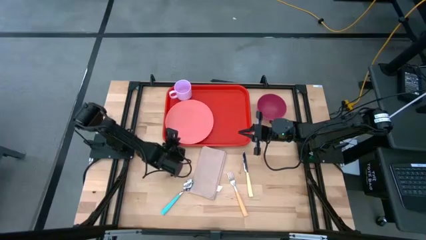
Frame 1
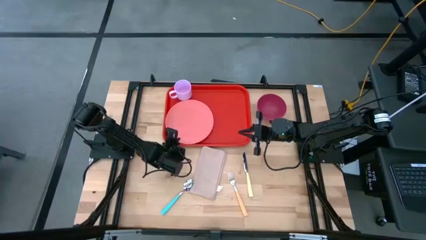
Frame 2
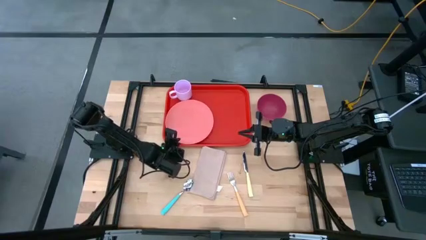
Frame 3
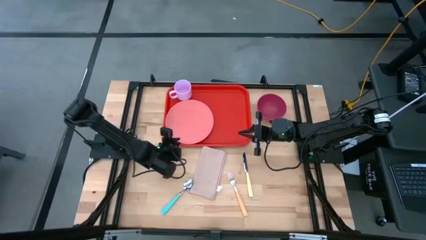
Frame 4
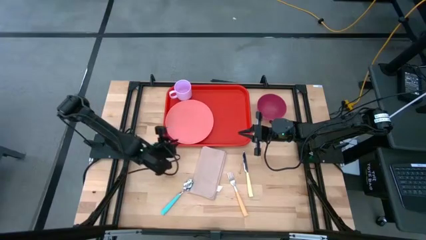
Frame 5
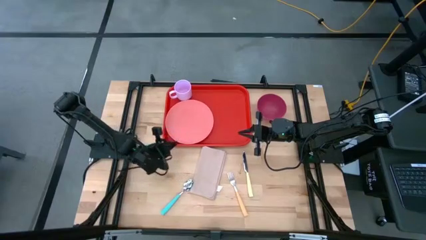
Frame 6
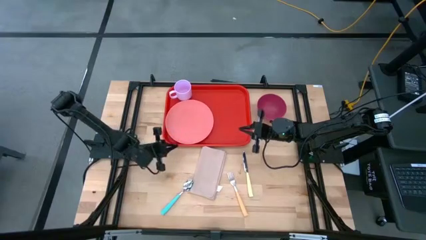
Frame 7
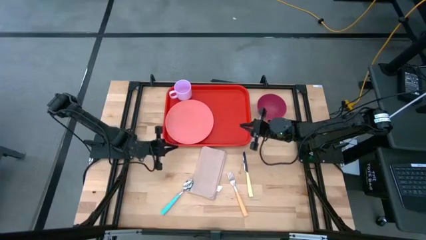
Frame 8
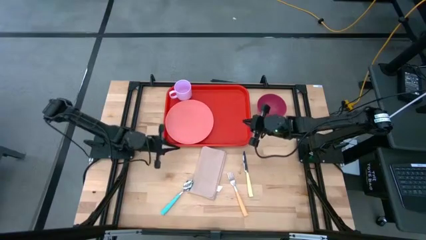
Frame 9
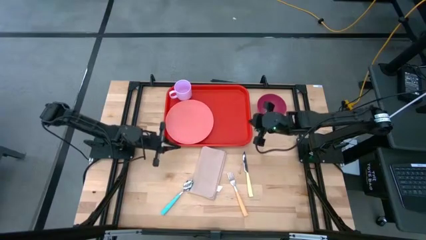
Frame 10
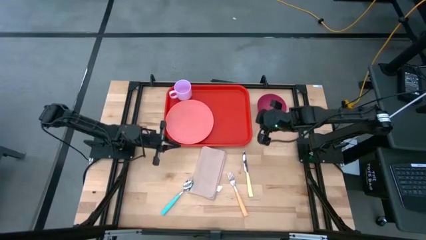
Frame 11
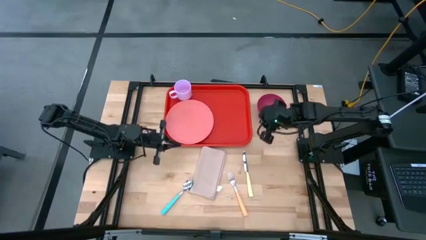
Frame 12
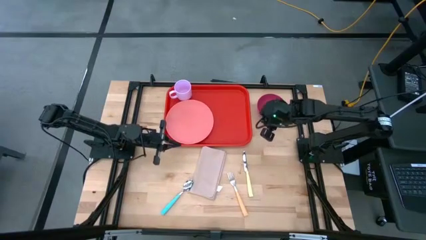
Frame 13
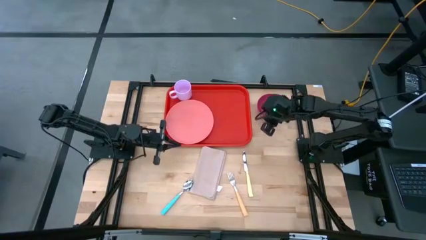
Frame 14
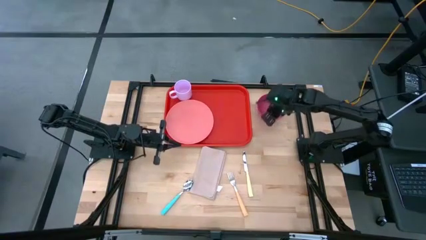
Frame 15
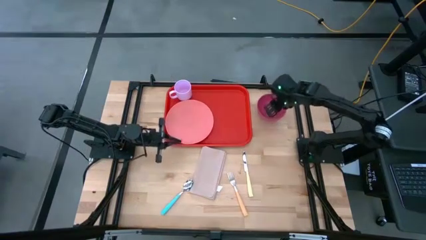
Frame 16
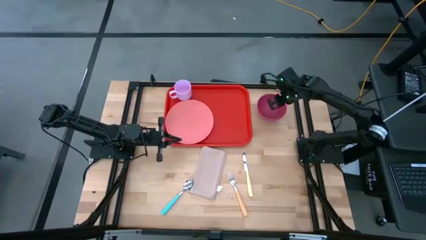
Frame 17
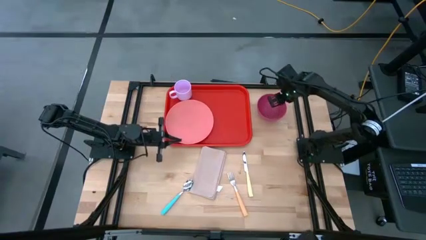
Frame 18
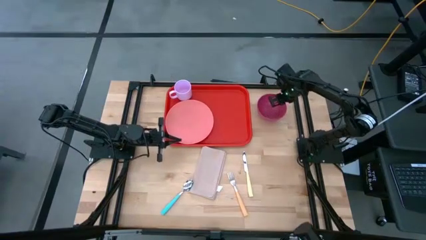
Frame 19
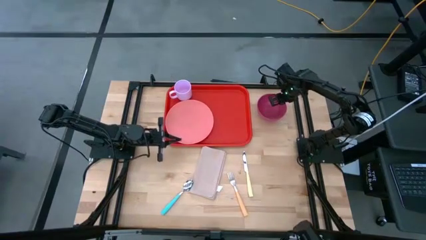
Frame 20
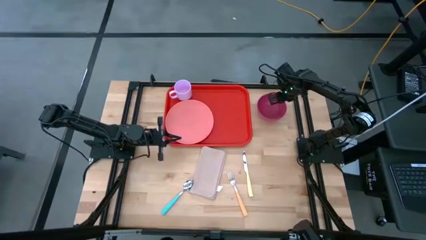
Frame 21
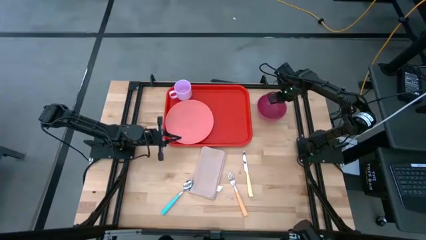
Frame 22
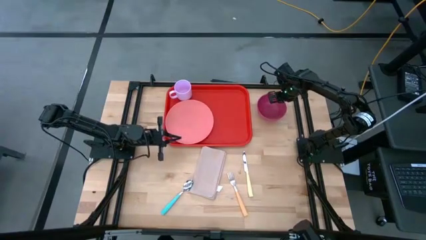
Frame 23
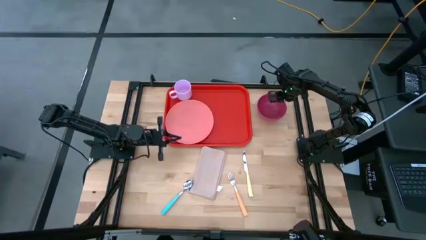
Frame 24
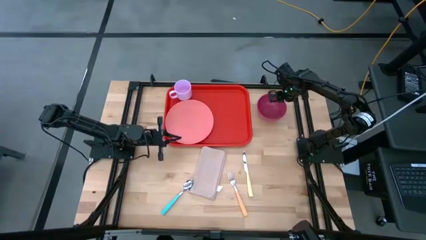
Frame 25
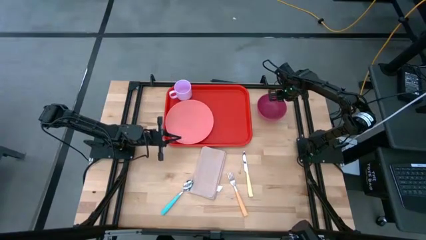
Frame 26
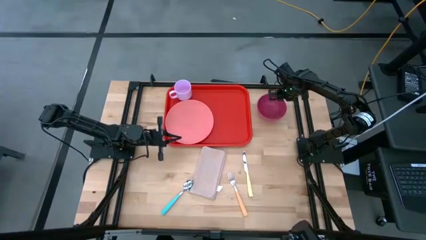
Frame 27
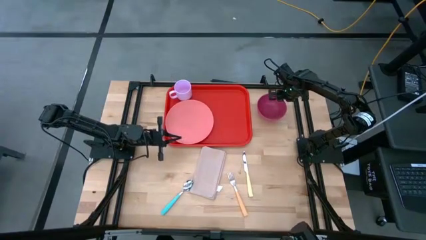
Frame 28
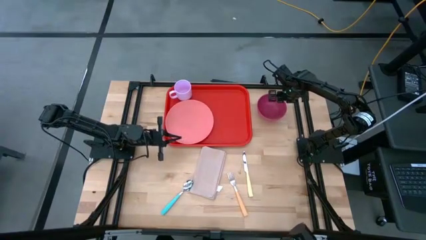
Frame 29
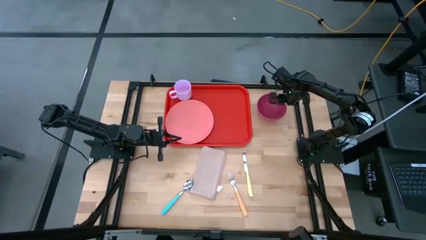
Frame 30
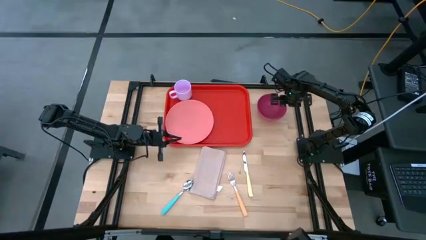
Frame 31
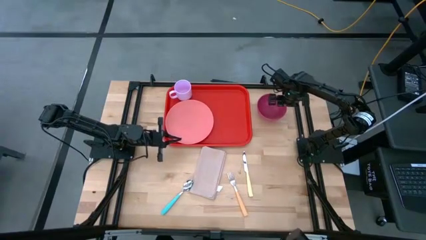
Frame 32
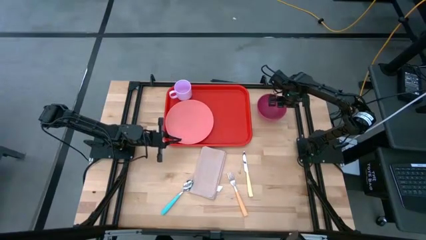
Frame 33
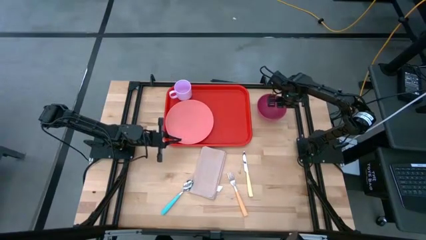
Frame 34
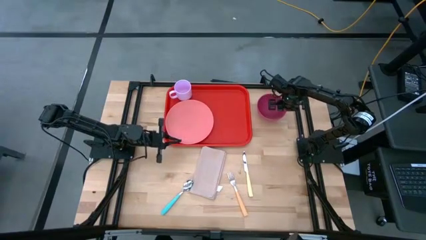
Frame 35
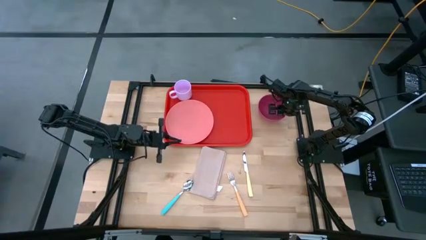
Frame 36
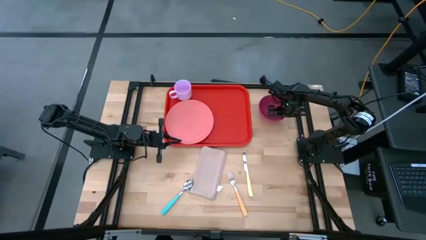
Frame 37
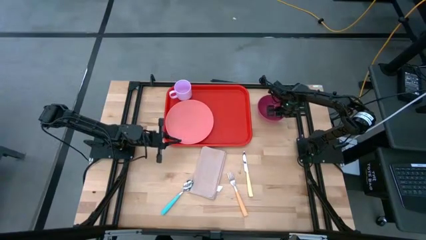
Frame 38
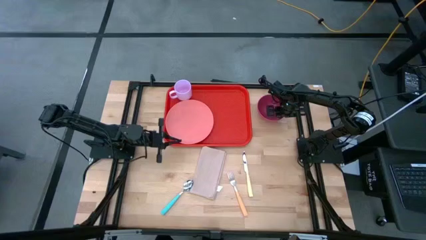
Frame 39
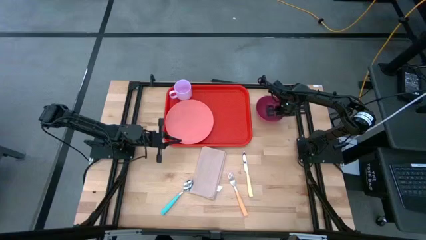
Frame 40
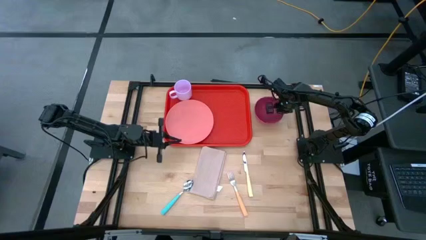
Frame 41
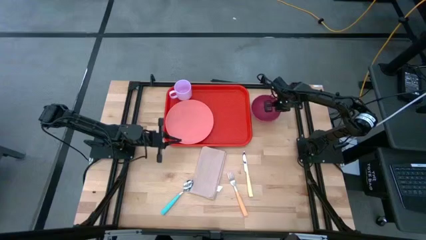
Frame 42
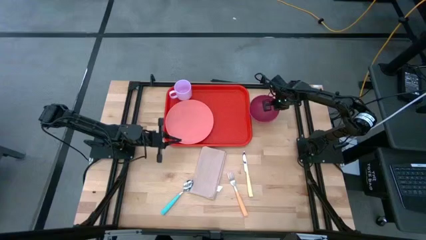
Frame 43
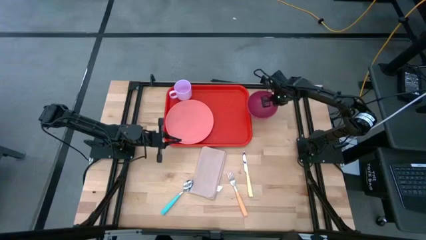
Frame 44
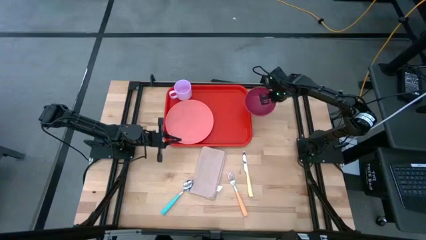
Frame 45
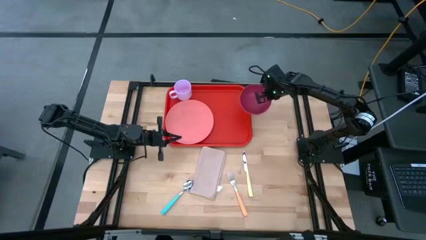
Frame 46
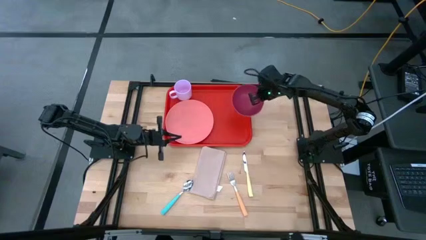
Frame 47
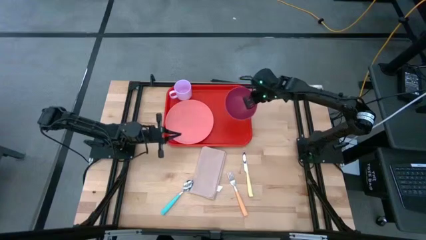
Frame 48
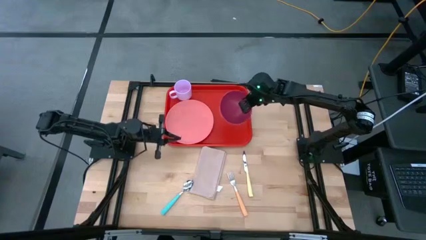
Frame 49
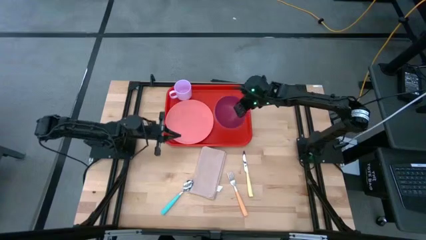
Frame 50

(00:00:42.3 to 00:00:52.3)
Task: Set up tray
Put the pink bowl on top of the light orange plate

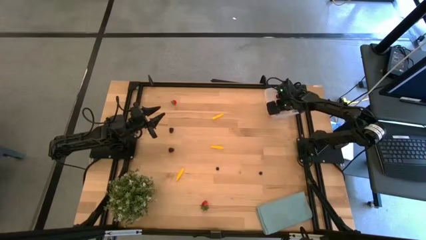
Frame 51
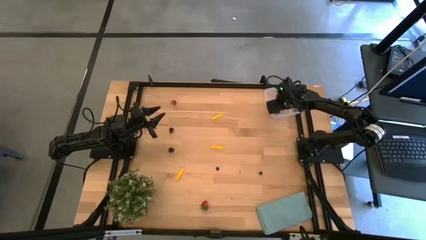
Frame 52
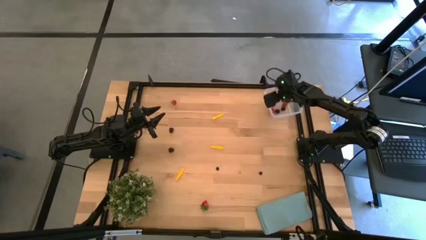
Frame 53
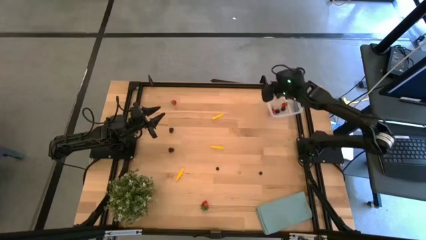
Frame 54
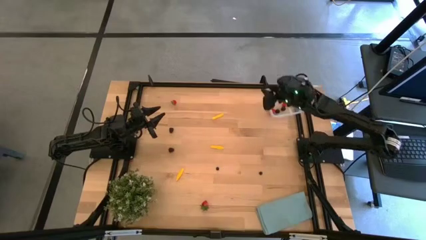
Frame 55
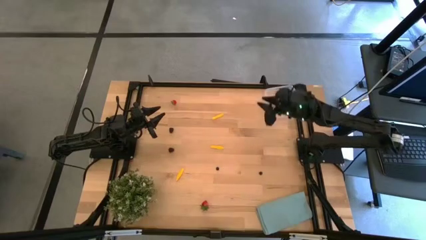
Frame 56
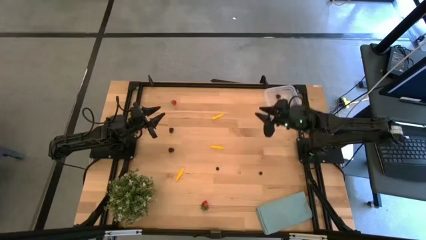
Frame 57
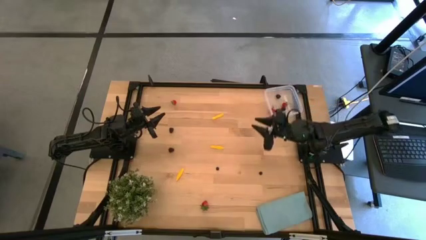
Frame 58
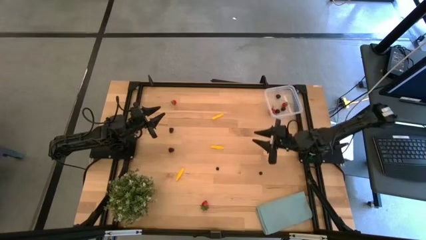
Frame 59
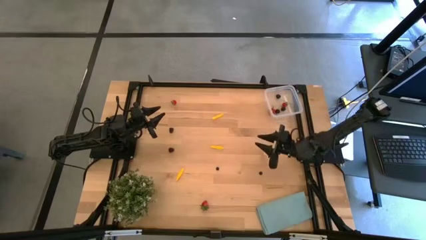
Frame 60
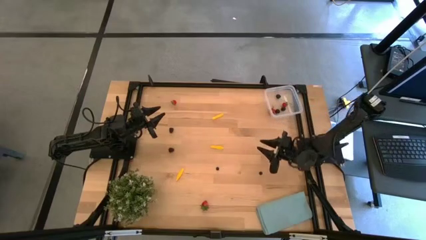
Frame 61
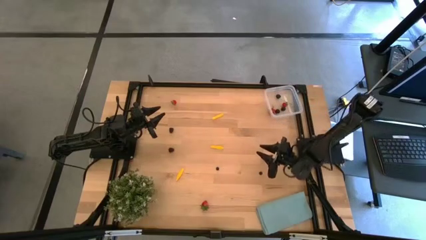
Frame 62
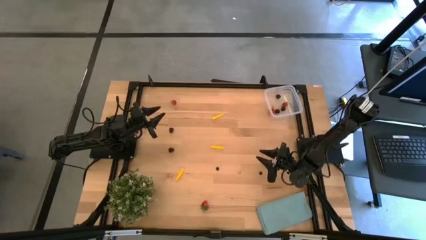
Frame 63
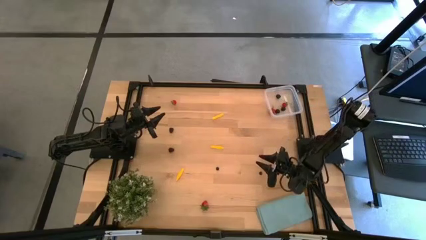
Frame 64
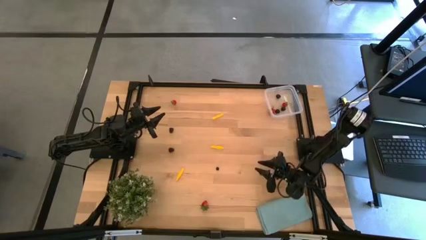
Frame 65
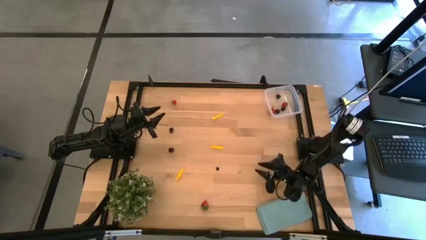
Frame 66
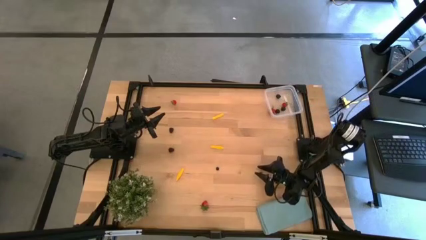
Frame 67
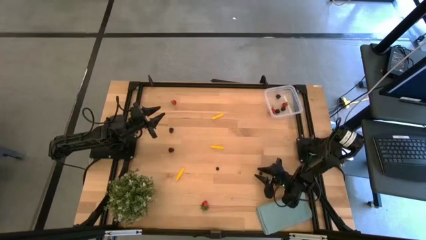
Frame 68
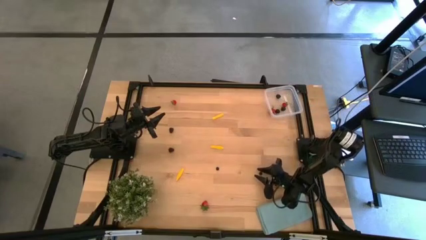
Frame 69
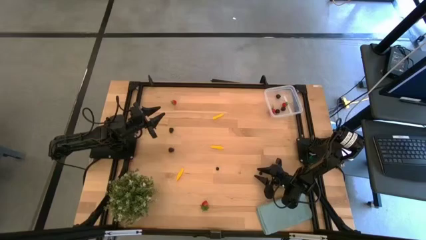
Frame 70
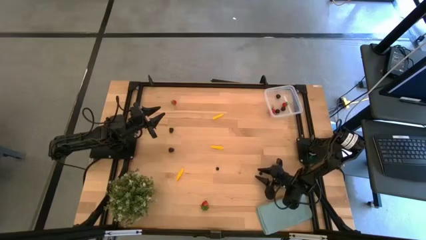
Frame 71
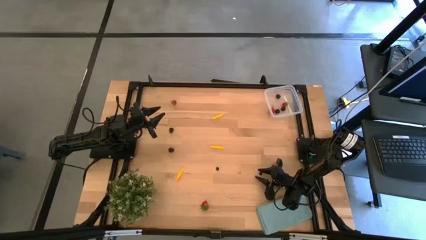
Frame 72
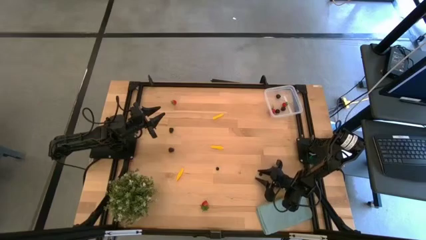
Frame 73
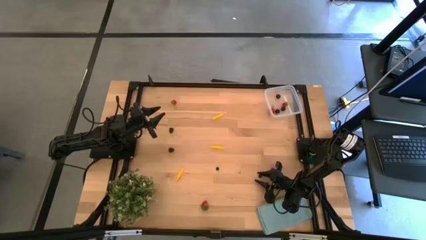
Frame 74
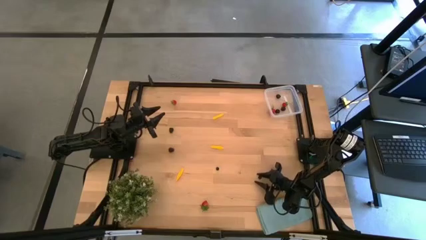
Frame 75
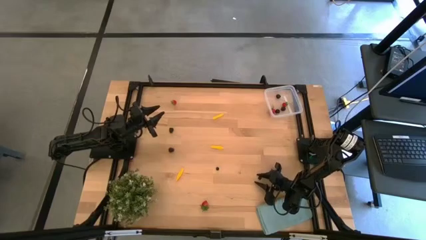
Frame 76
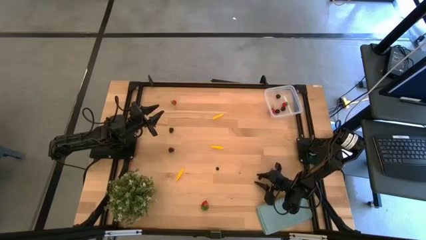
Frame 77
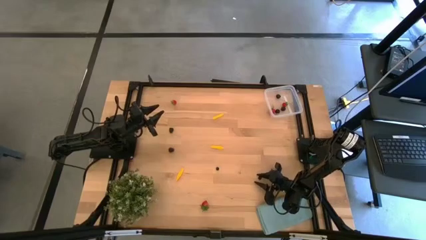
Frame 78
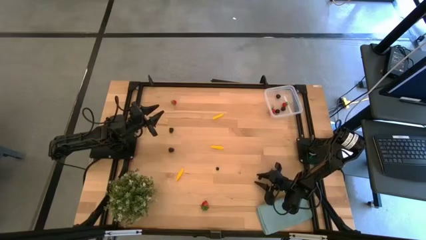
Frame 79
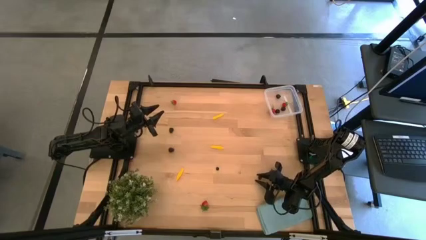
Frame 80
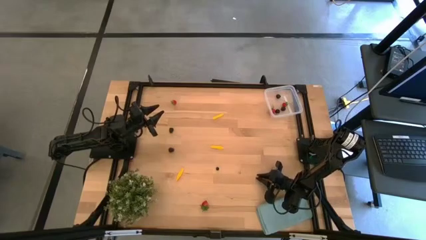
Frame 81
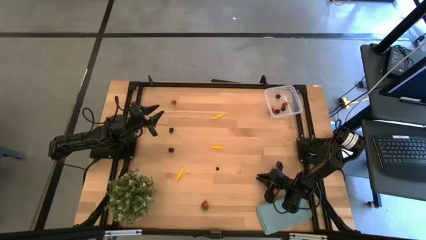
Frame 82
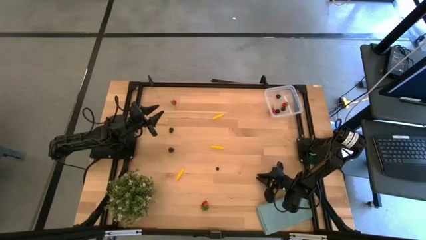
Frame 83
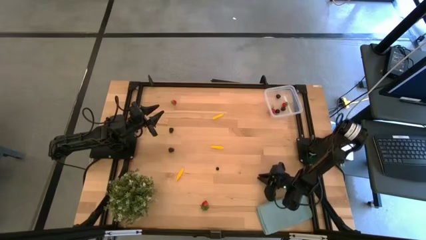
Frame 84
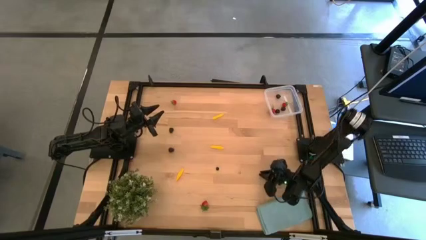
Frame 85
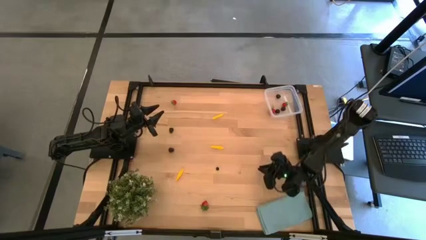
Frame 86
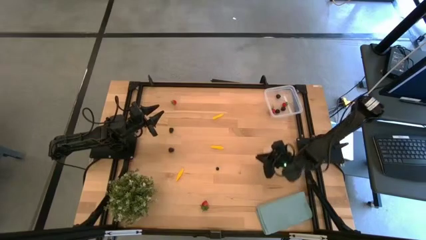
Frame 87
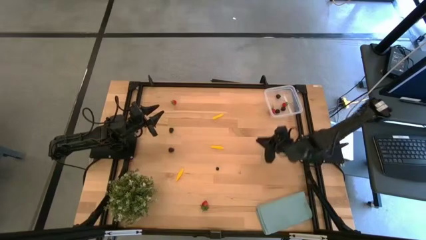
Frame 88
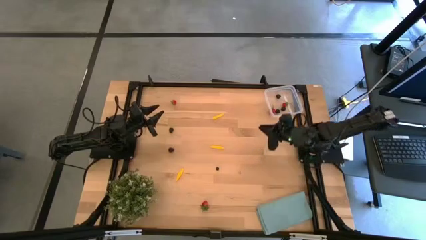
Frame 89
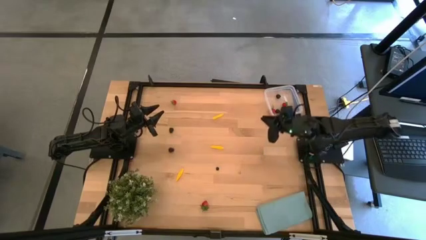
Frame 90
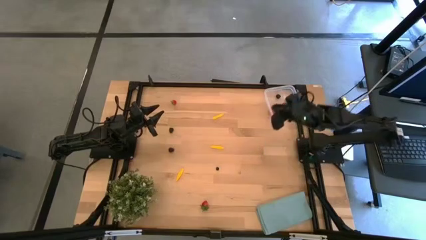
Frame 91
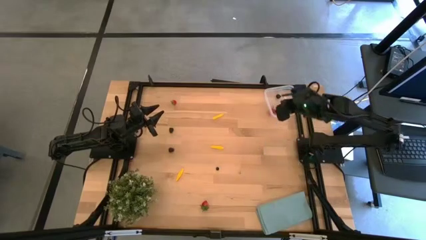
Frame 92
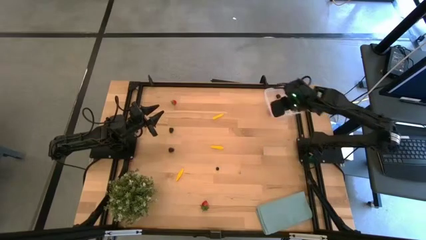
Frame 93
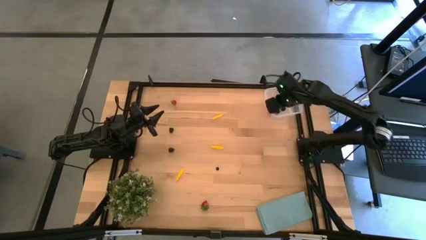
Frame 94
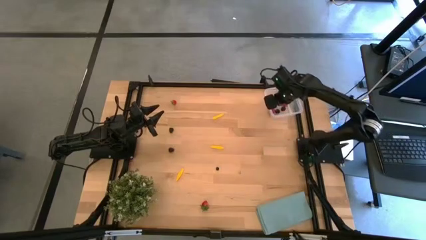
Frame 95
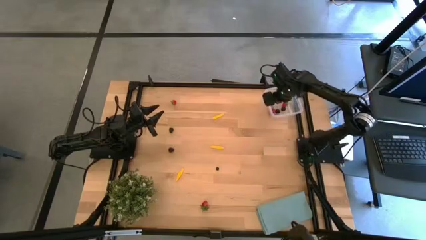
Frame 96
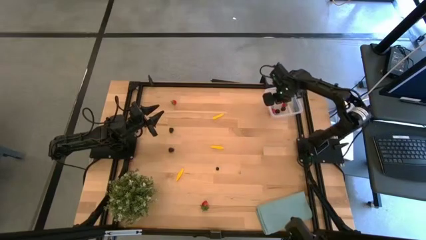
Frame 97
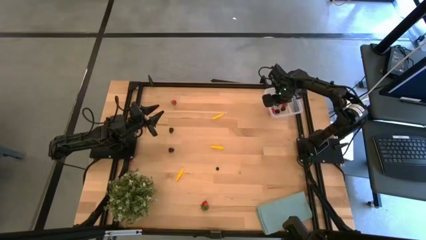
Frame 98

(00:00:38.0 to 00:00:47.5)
Task: Pick and placing Produce into tupperware
Put the blueberry into the transparent bin
